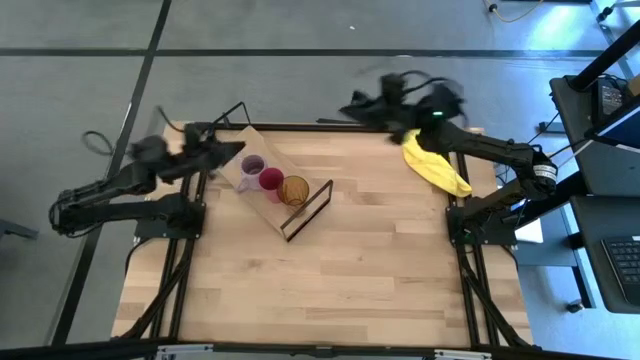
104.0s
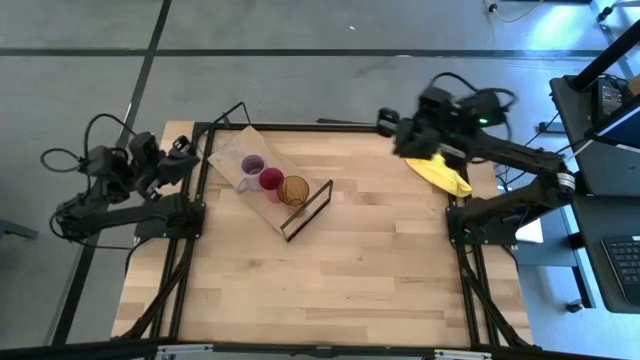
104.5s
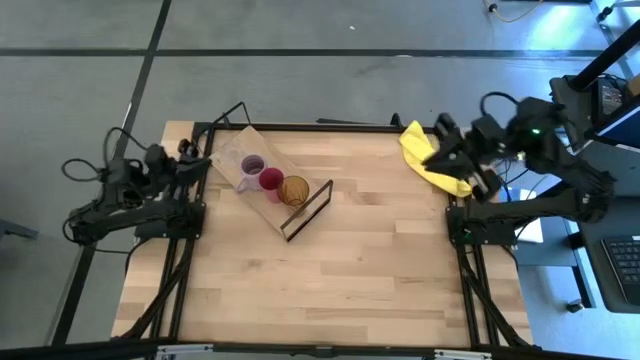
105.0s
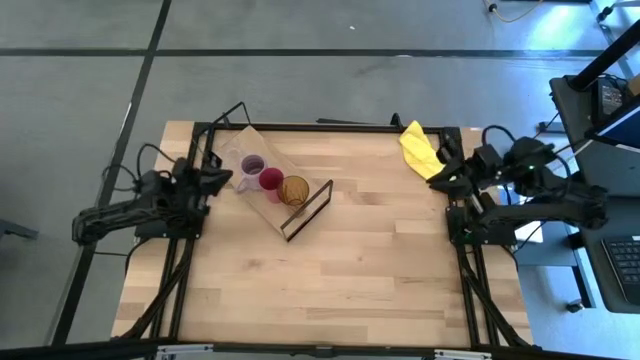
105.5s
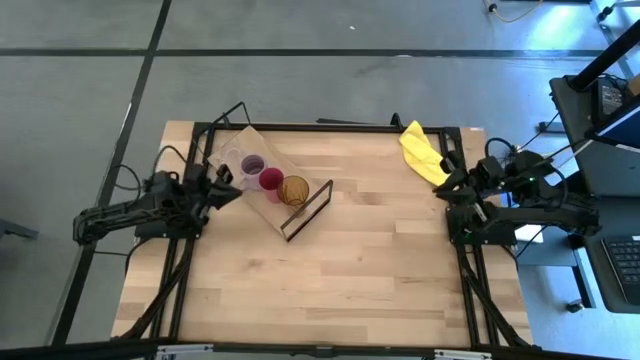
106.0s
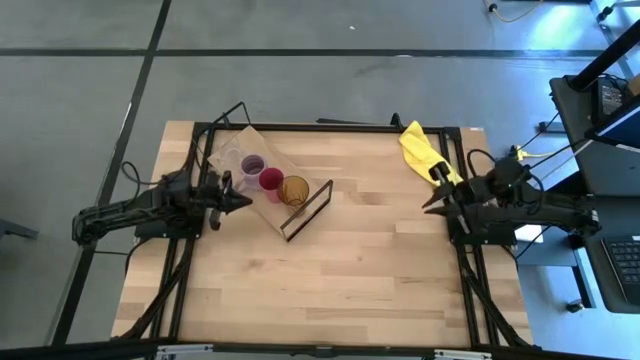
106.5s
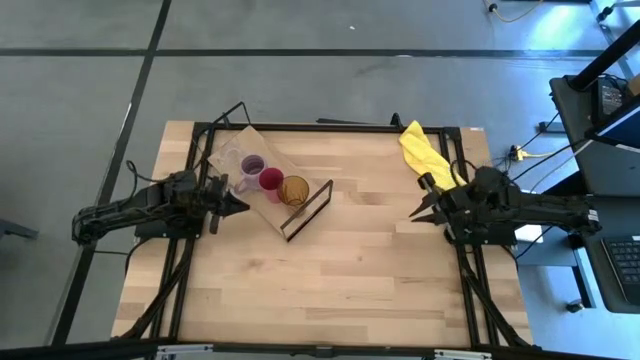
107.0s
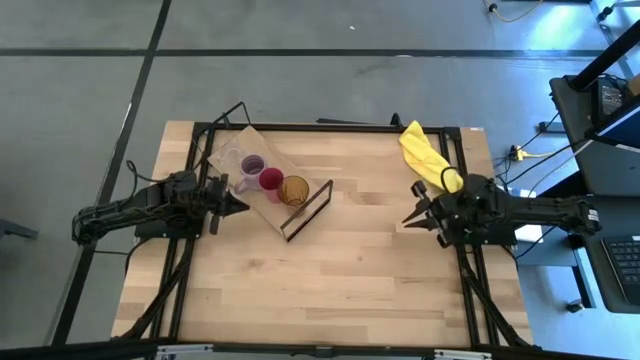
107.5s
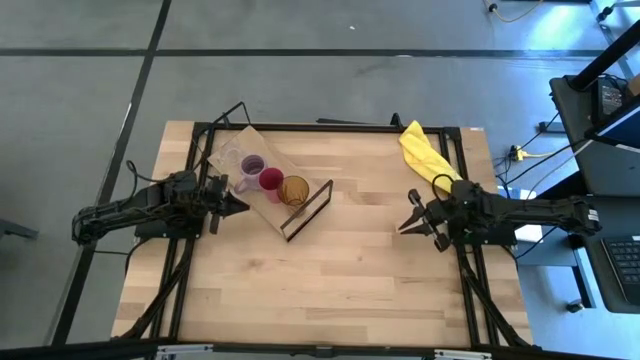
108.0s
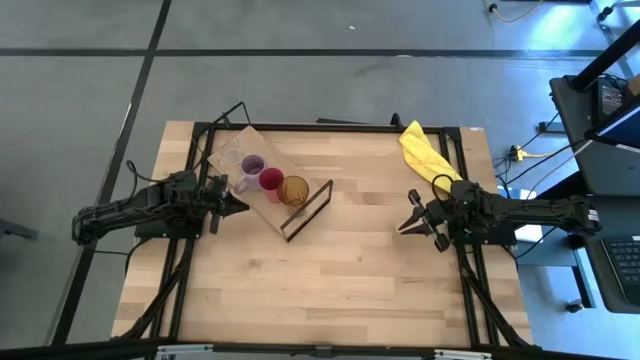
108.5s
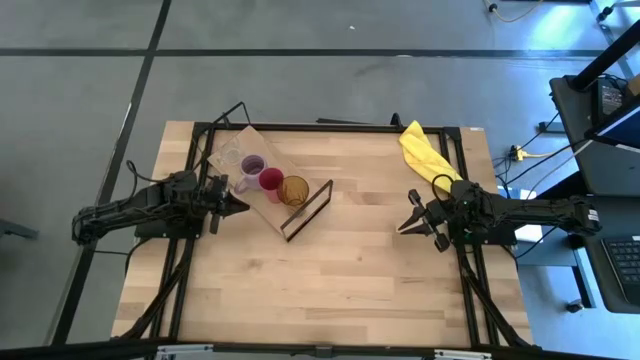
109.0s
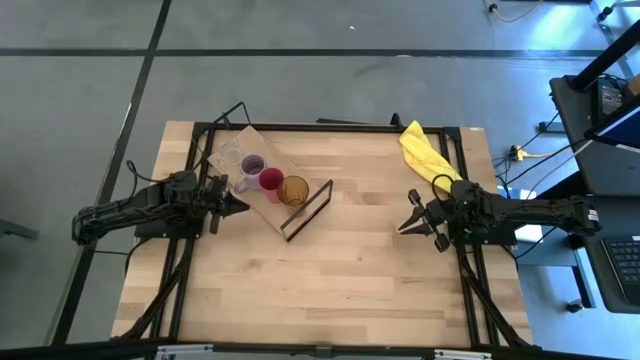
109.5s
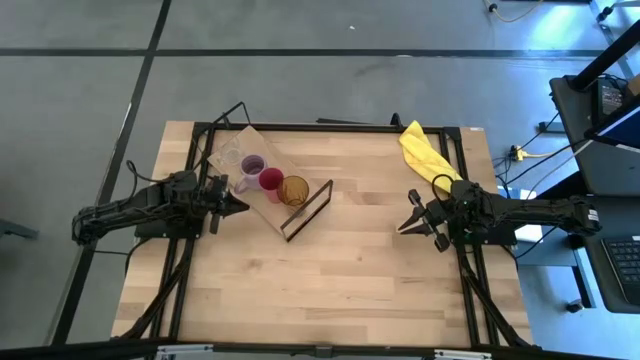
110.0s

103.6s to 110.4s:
Task: Stack small to large cups/mugs on shelf
Return to Home Position

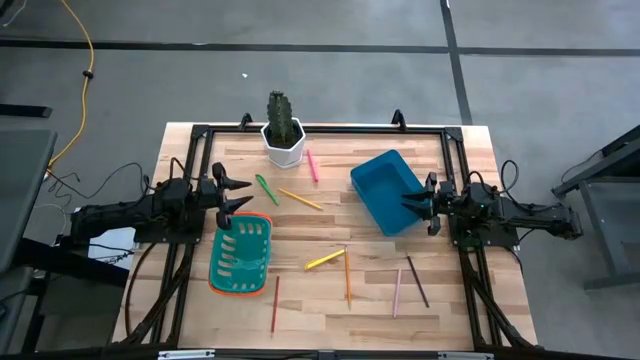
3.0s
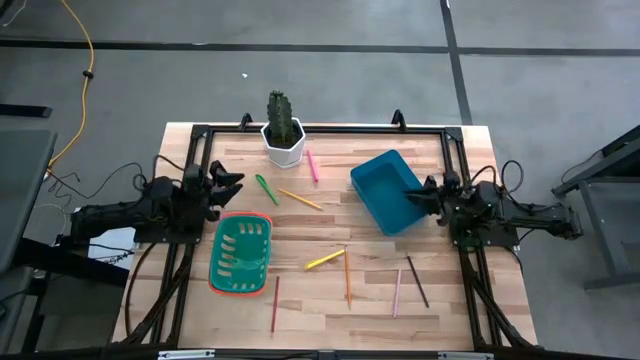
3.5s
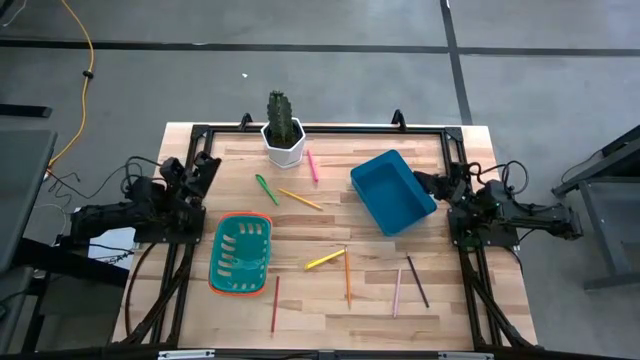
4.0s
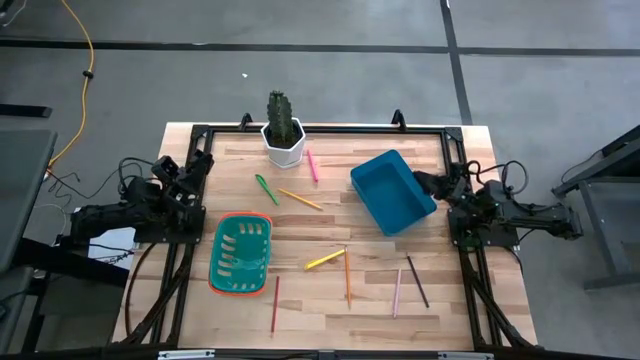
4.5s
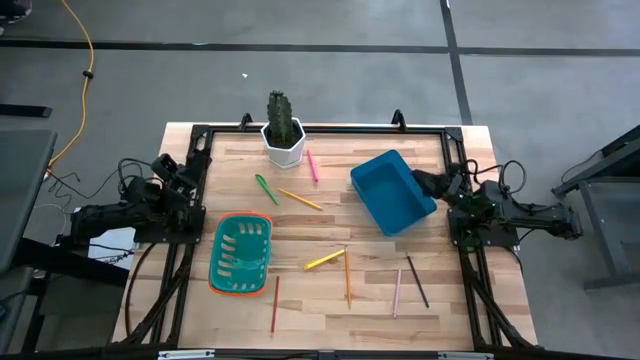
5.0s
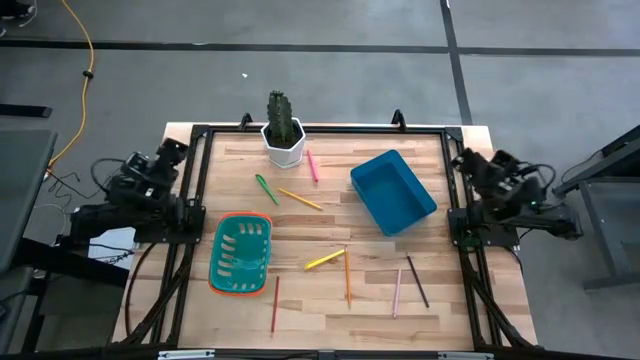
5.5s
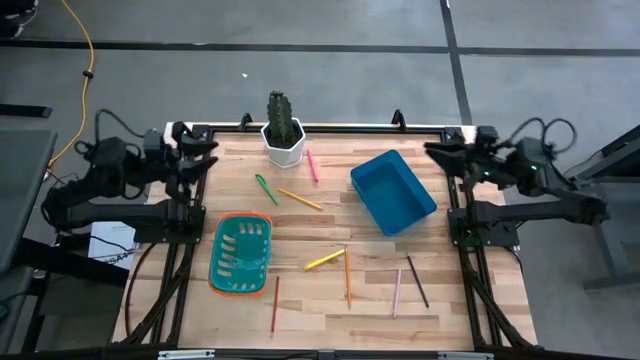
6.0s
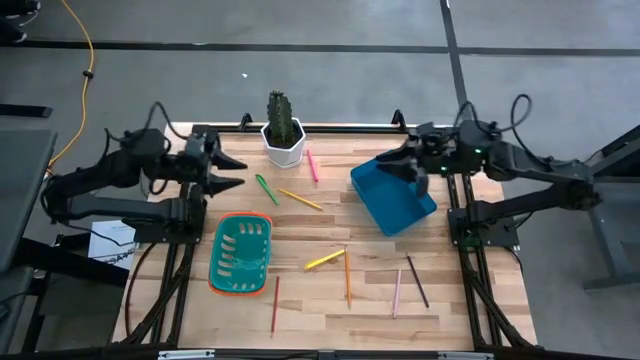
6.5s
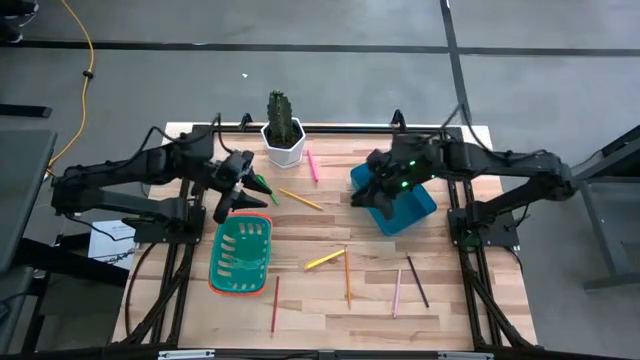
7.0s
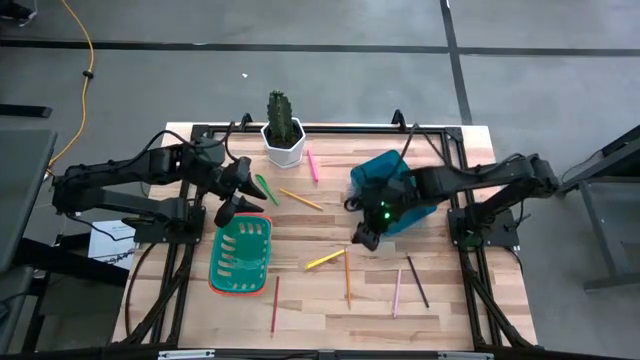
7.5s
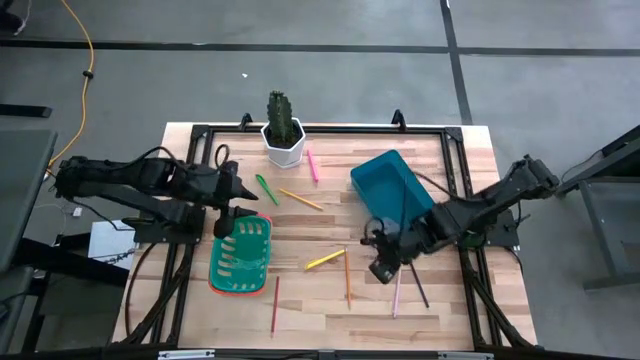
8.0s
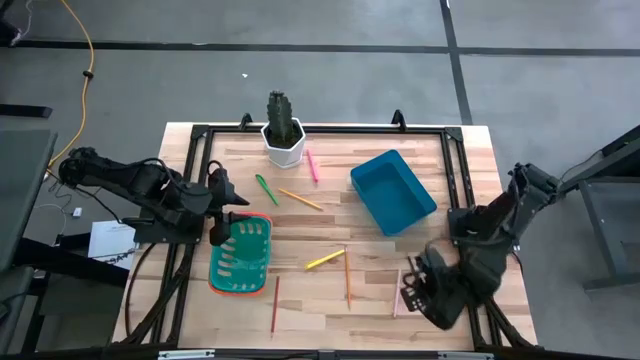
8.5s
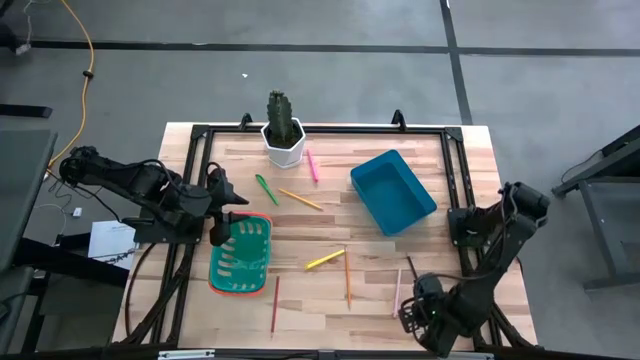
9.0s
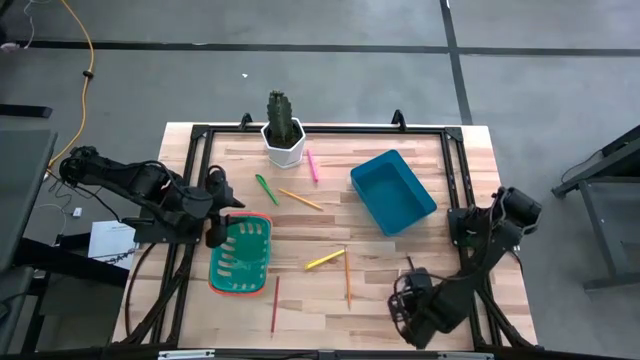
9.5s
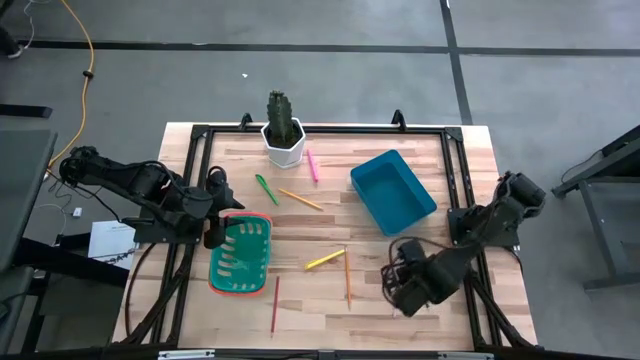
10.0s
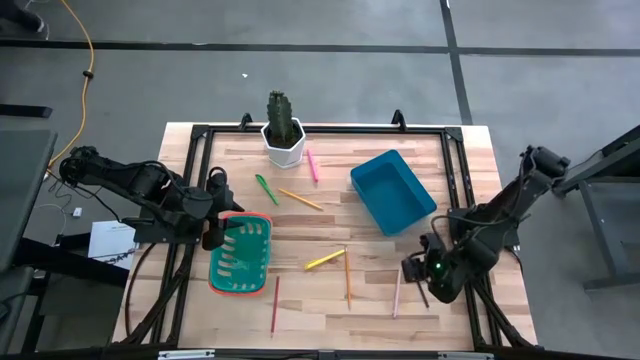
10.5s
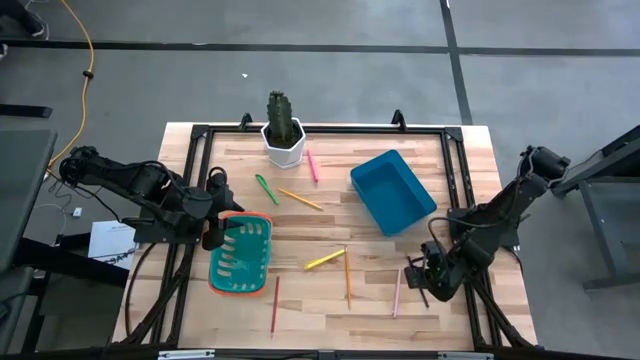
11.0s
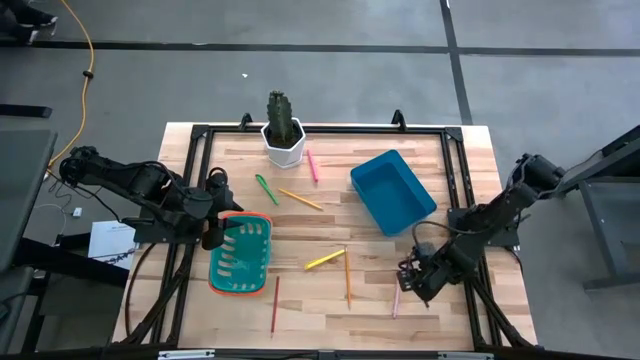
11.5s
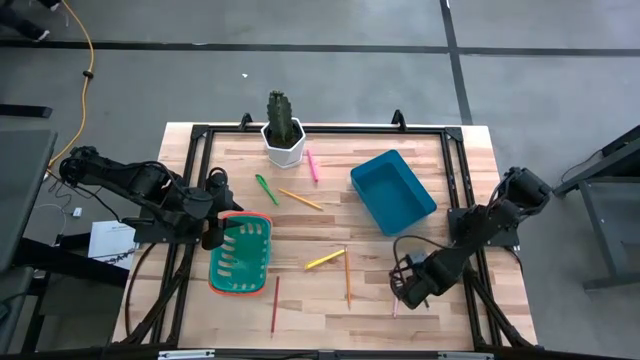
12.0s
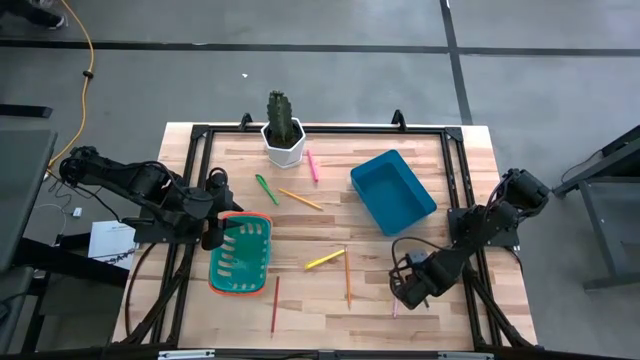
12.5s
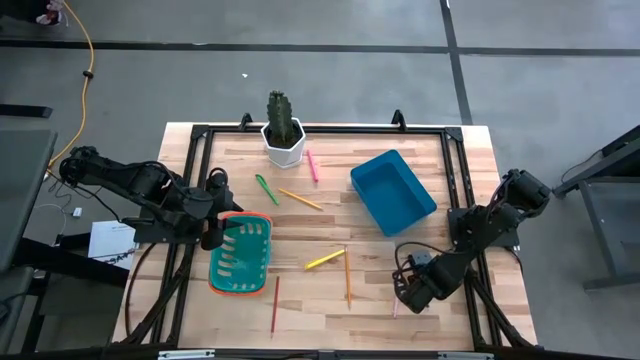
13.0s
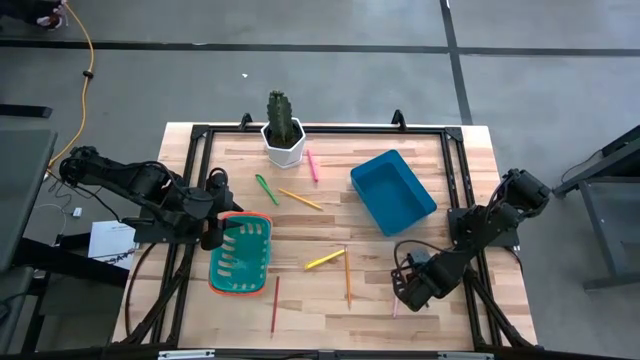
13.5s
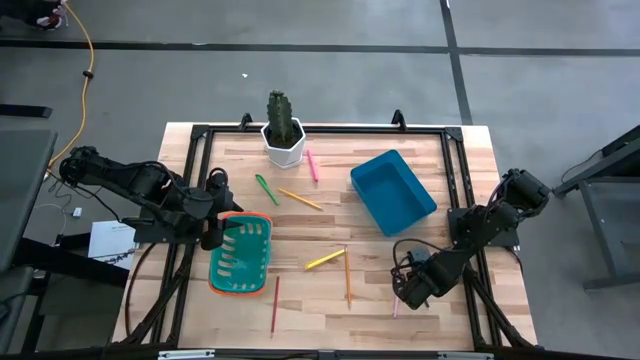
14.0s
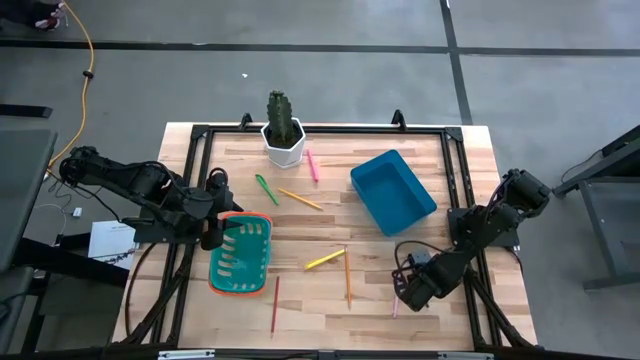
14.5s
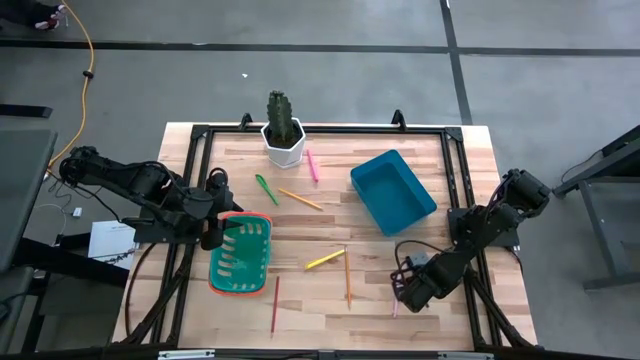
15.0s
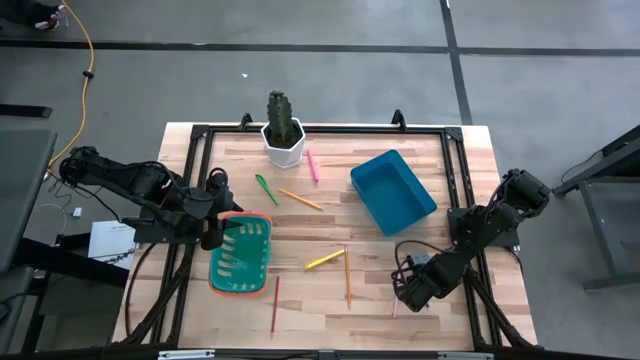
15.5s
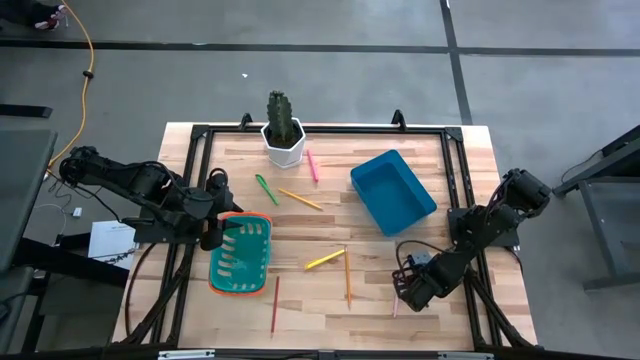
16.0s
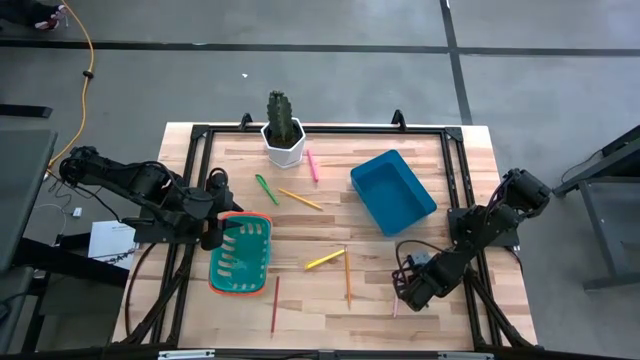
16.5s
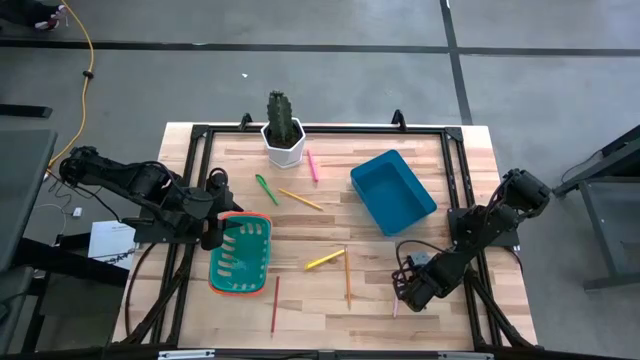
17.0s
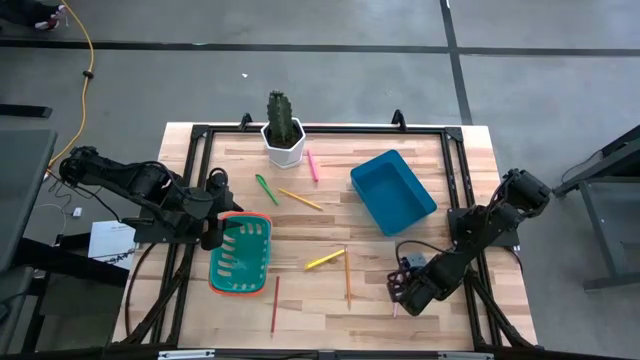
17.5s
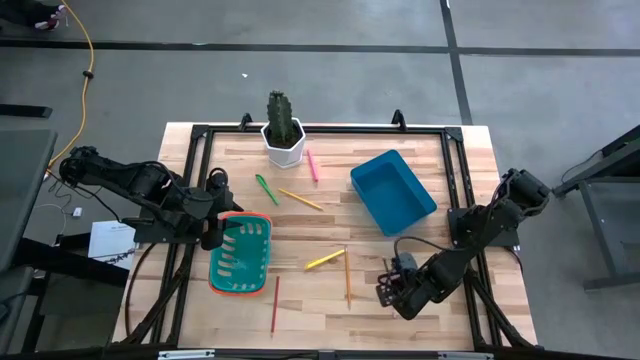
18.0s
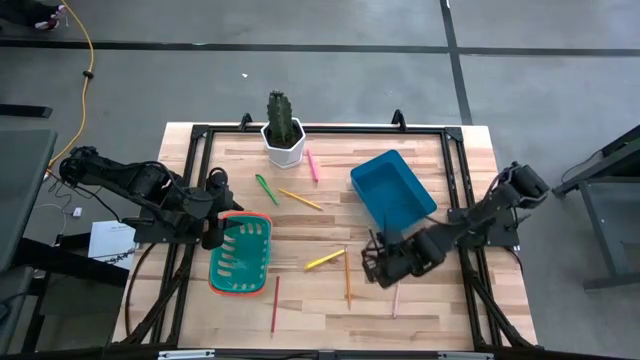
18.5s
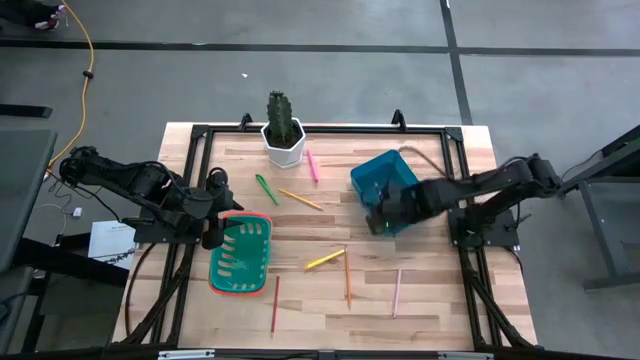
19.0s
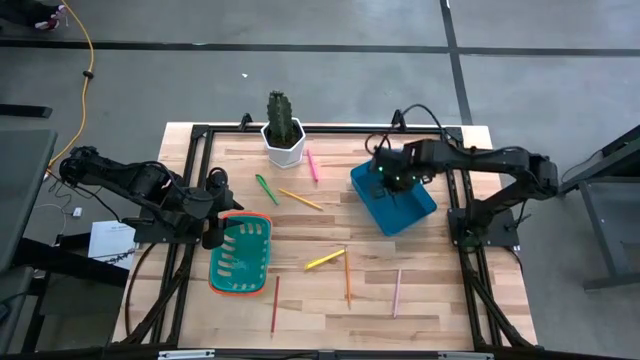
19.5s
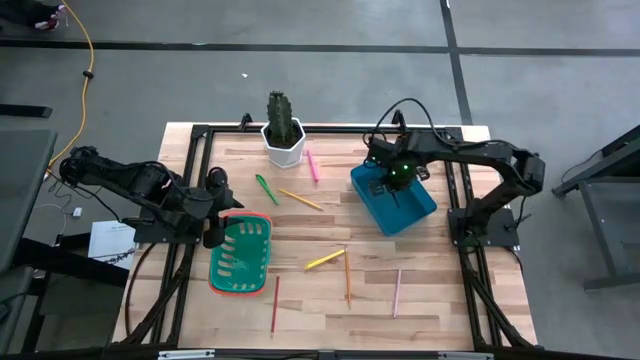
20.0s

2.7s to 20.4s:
Task: Sort pens & pencils
Put the dark blue pencil into the blue bin
